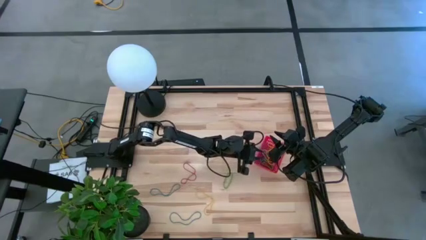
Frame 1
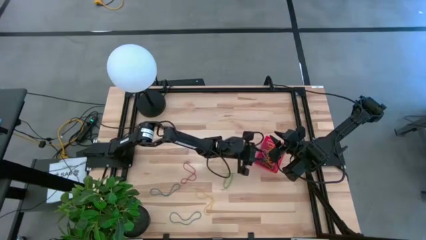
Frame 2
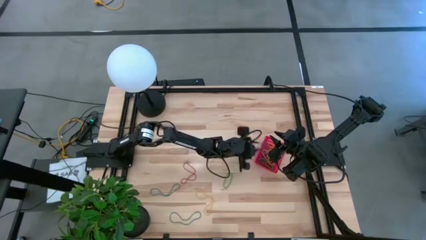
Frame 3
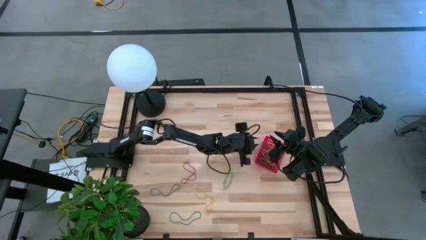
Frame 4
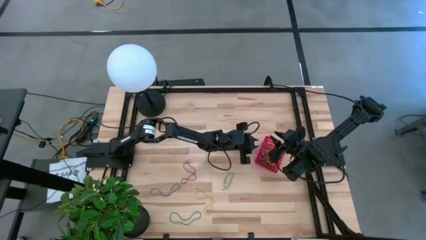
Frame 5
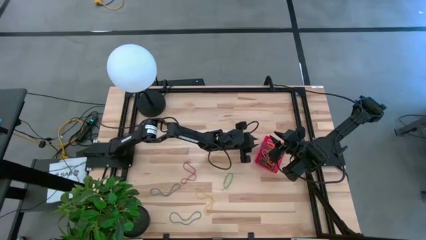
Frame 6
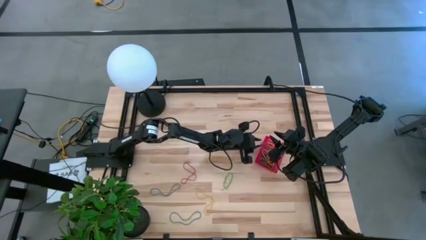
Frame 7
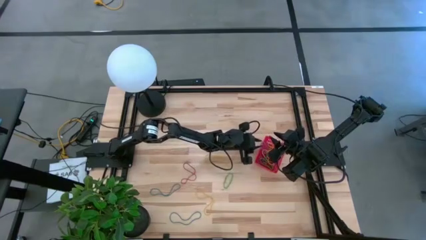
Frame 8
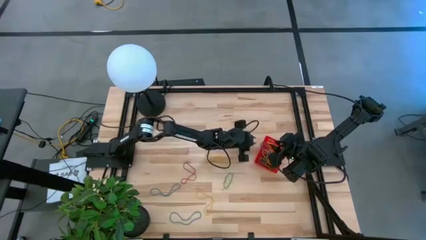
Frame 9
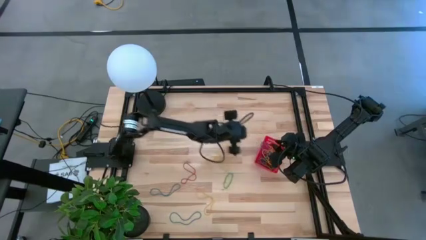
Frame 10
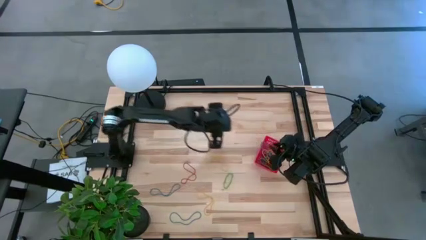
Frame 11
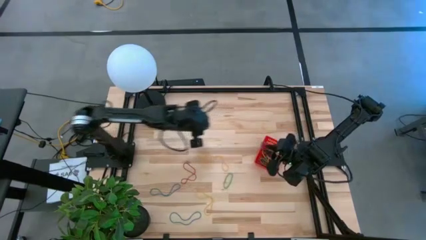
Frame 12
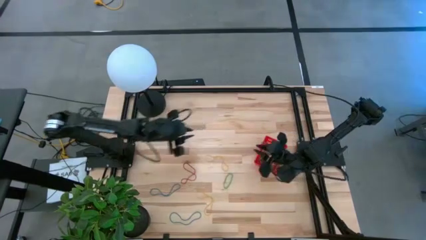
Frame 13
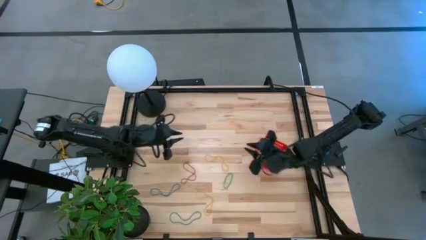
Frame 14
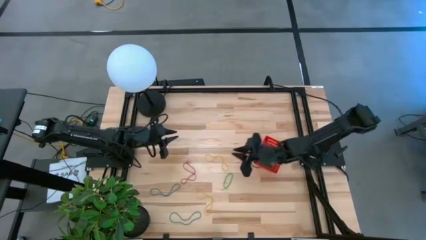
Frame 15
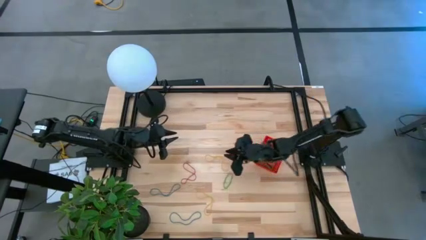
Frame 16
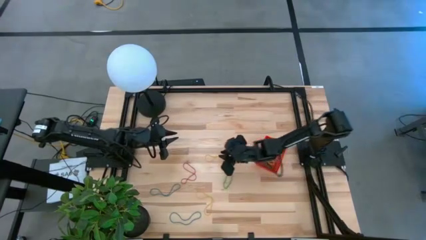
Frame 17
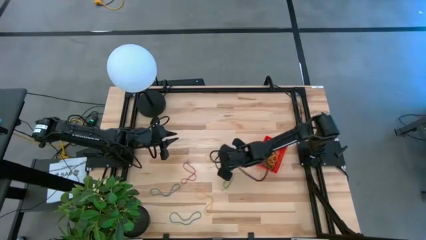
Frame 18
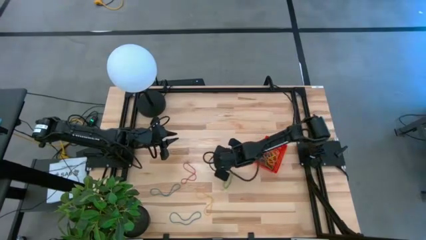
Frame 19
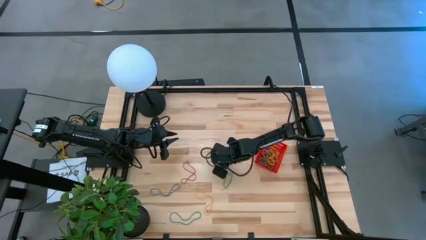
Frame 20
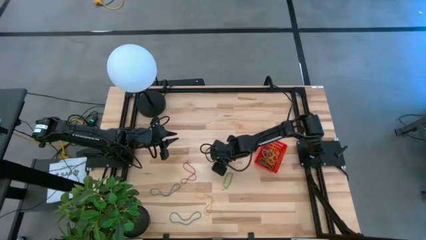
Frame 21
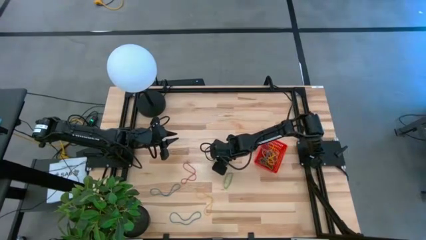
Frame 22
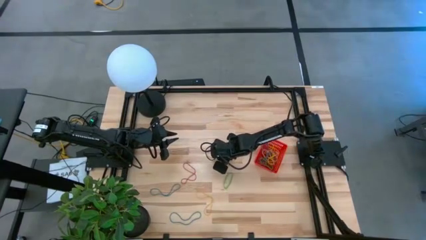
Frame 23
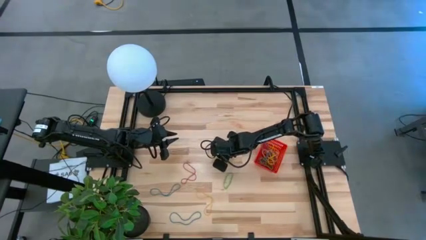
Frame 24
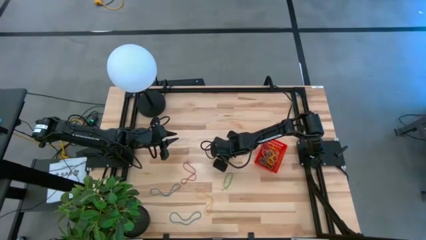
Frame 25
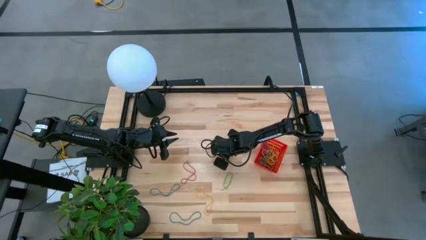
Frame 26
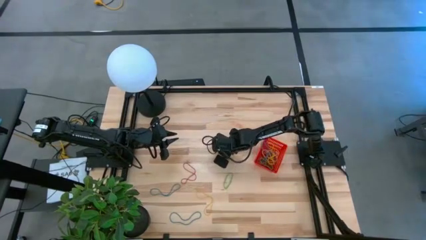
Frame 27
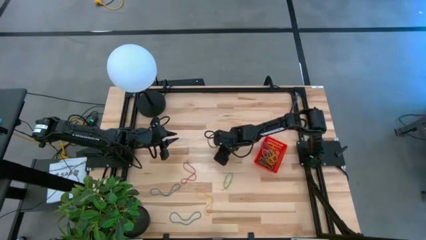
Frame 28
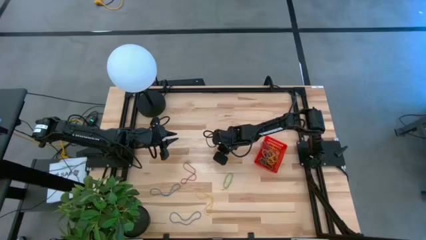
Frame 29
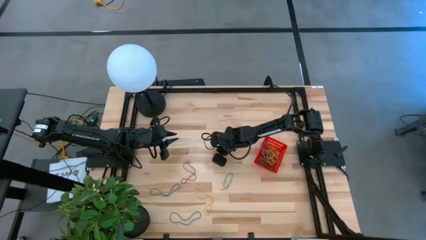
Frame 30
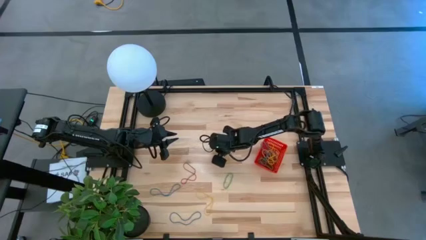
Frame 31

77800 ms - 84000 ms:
Task: Pick and place rubber bands into bin
Put the yellow rubber band into the basket

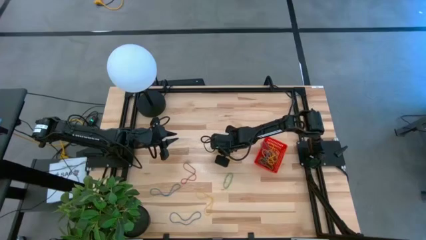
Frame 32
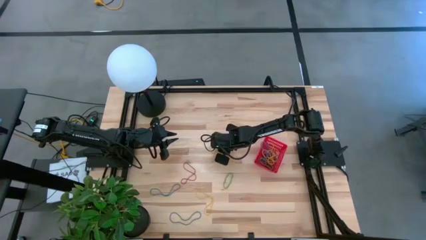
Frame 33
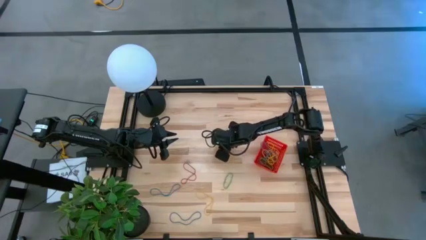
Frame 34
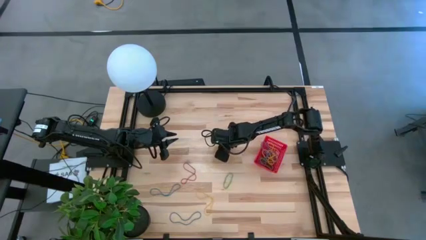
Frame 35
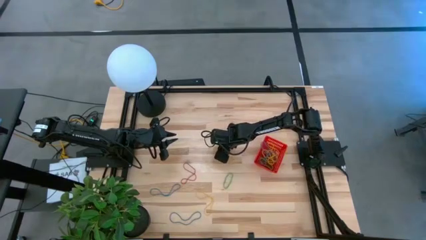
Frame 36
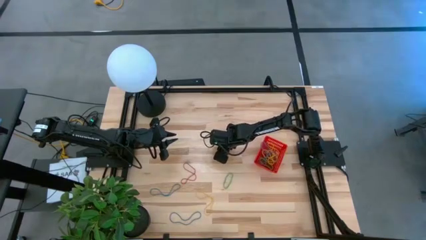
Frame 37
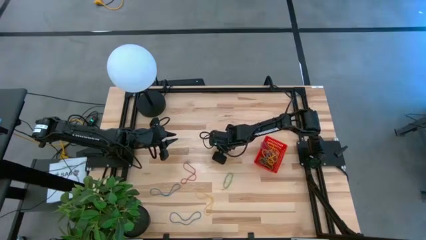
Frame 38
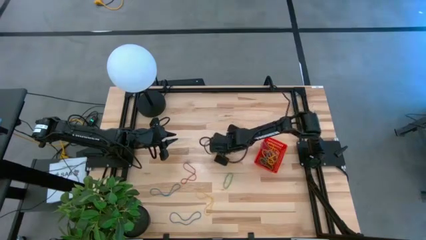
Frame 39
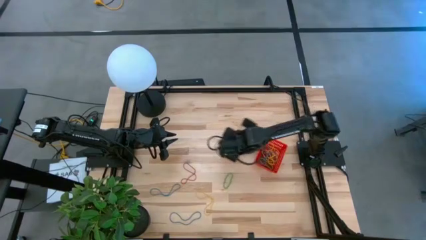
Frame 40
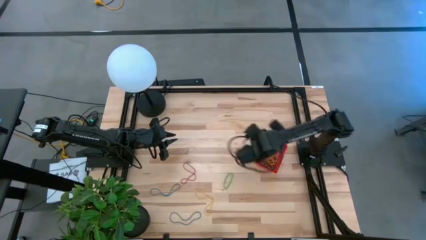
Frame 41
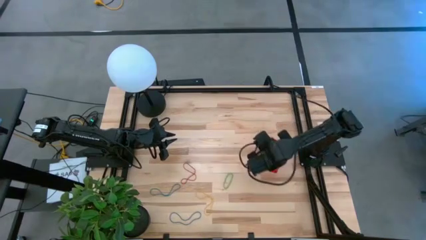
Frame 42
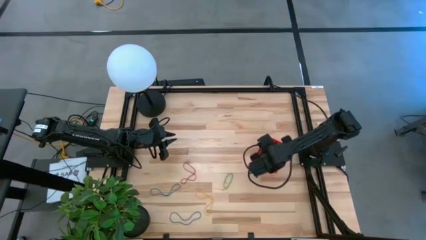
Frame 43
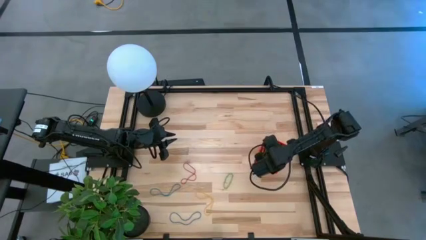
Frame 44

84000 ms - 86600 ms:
Put the yellow rubber band into the basket

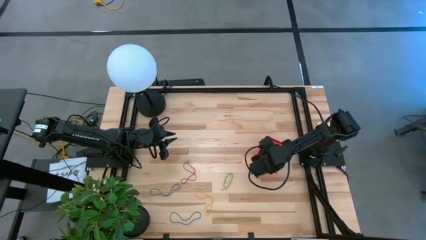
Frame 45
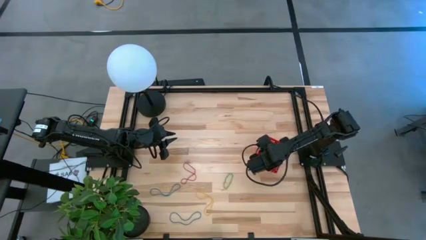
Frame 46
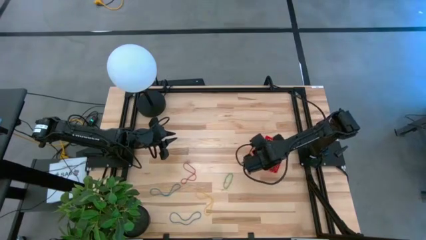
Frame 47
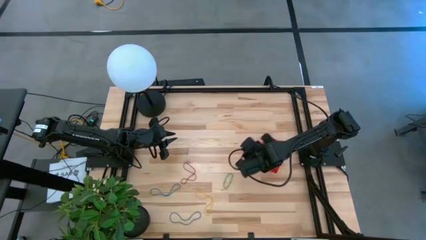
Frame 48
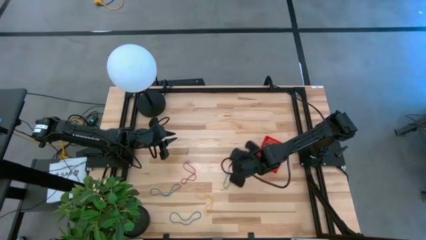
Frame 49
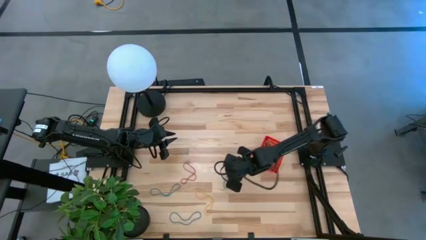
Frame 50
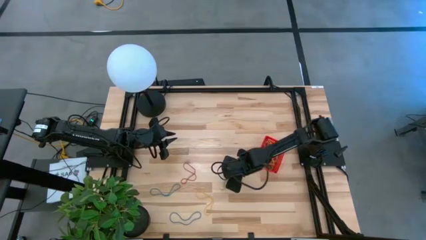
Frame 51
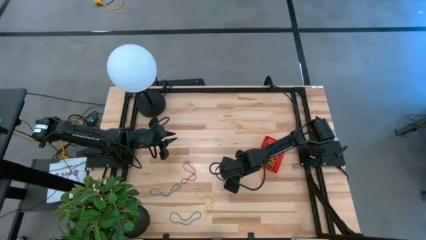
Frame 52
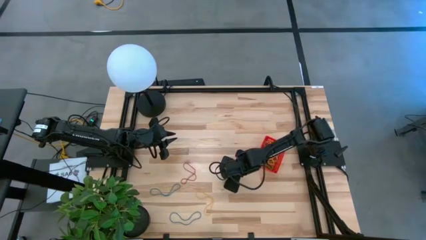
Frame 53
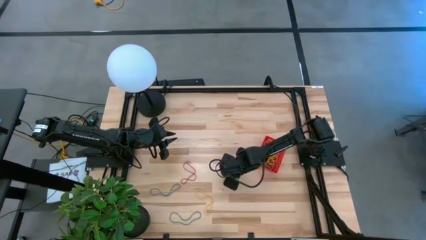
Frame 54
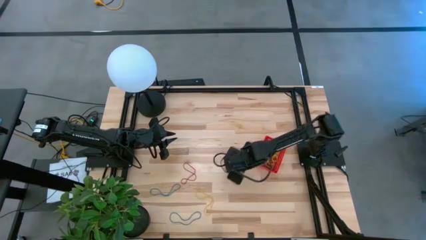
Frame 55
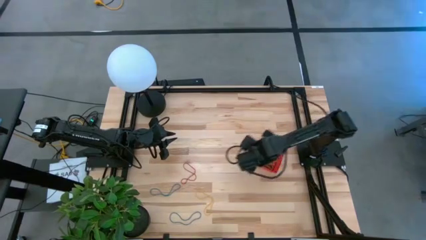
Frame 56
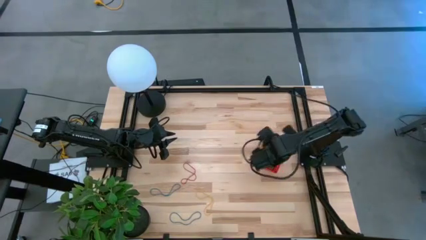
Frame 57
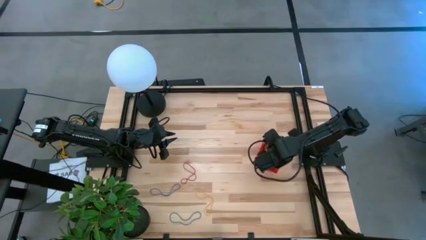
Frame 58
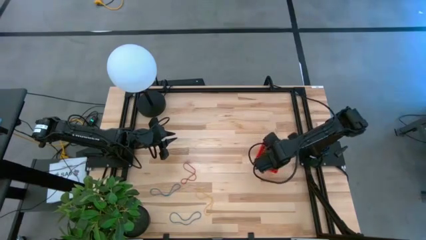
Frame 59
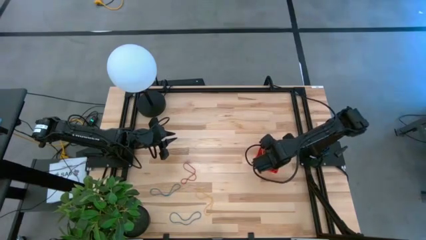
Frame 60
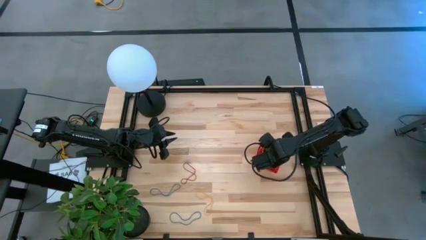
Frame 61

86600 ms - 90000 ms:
Put the green rubber band into the basket

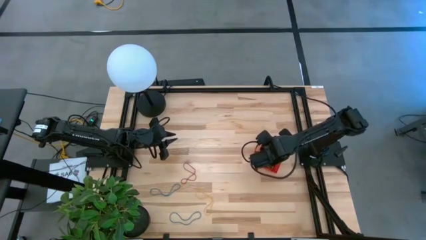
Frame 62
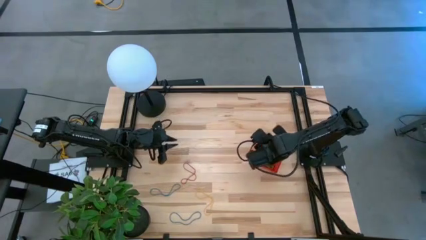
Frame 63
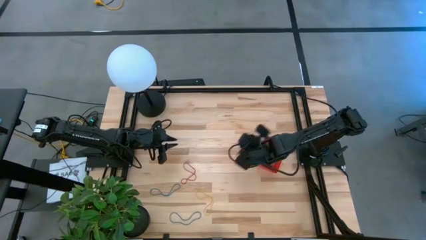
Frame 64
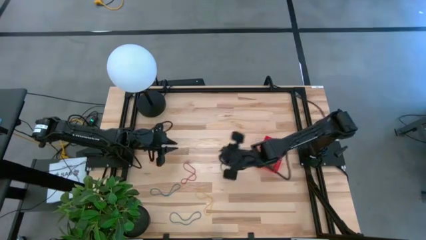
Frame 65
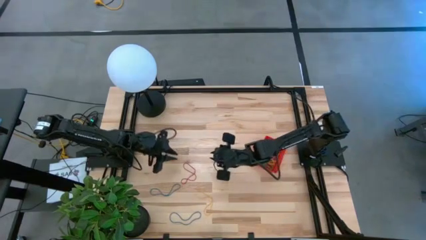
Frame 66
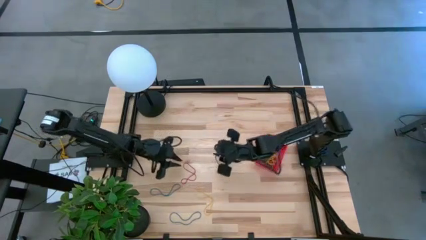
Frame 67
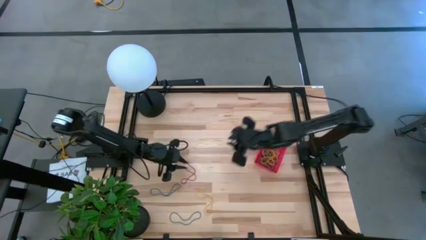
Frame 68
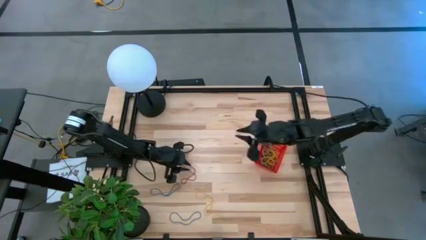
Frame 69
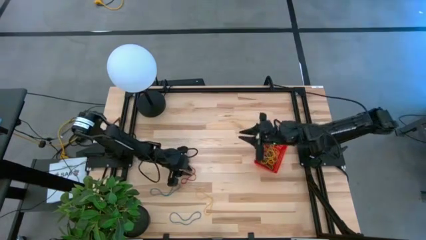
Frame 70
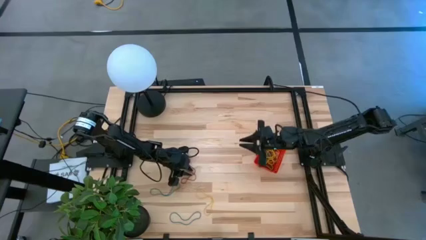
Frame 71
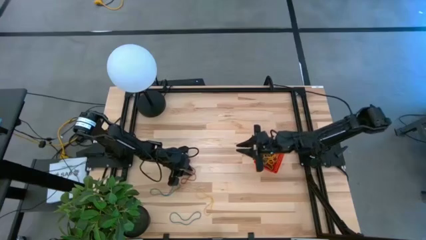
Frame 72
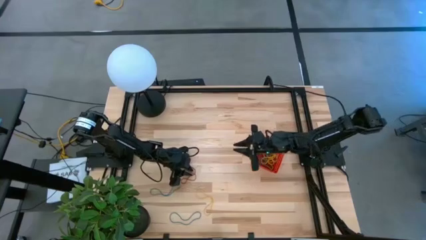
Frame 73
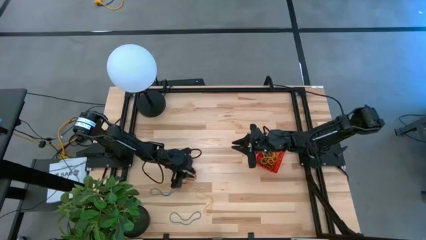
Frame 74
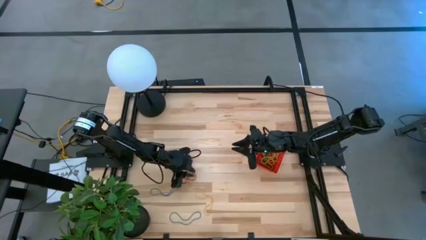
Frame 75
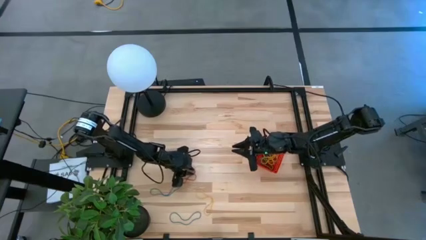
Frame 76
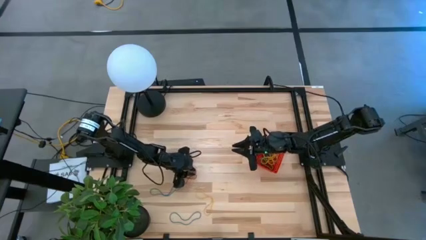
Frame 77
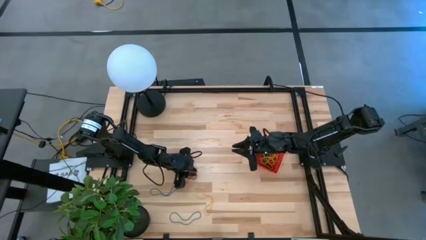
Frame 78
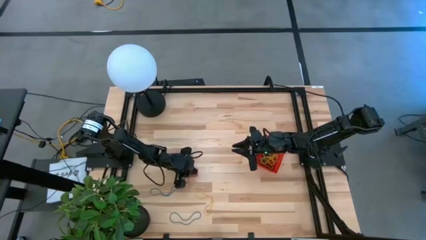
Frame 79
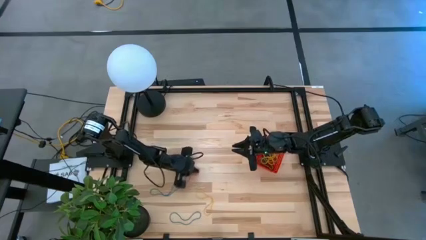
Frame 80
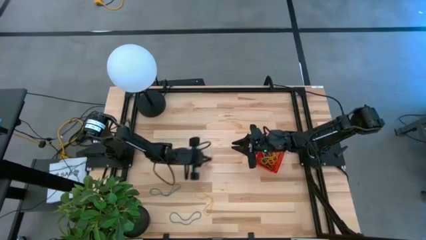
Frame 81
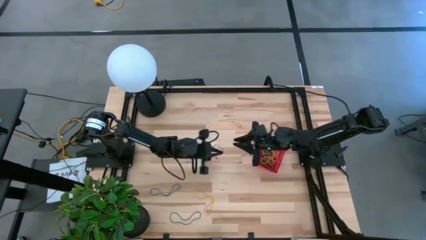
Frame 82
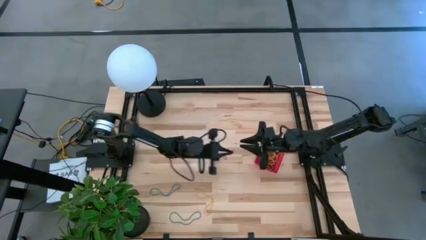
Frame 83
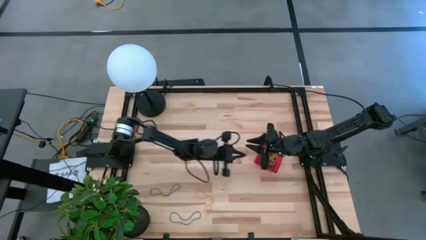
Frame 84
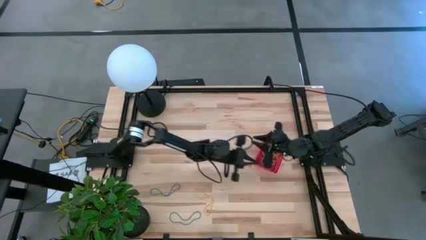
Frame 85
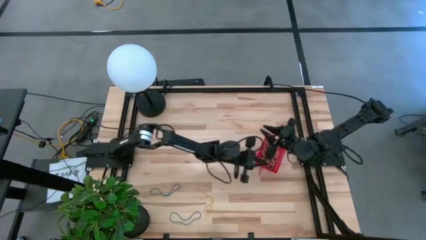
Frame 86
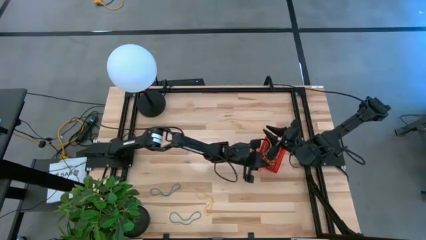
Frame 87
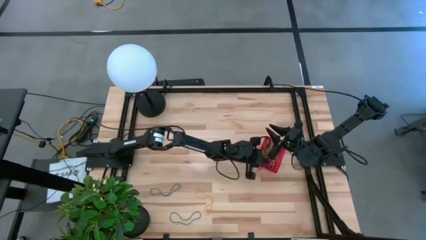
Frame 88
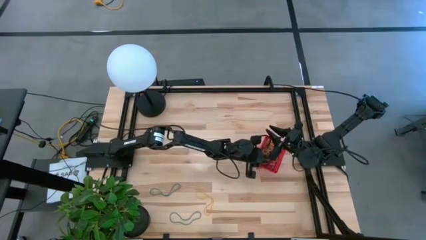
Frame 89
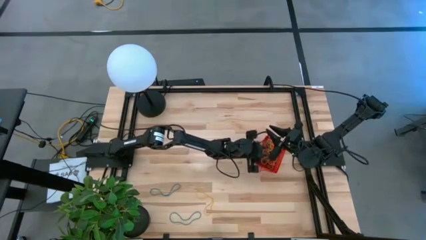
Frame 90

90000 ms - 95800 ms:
Put the red rubber band into the basket
